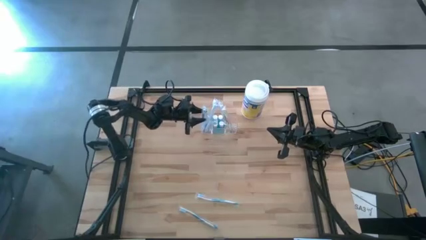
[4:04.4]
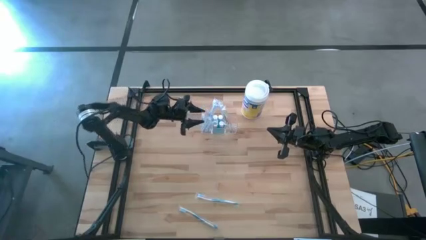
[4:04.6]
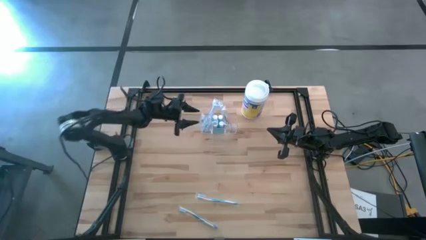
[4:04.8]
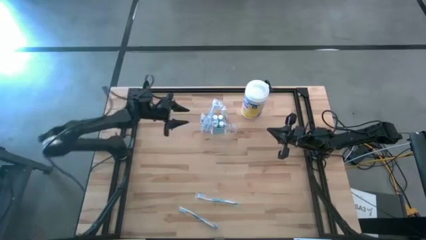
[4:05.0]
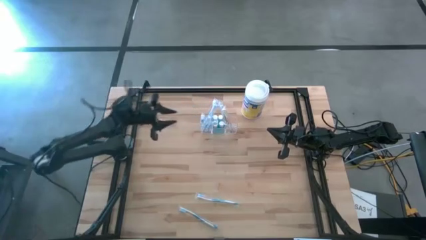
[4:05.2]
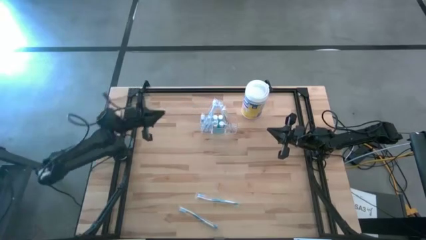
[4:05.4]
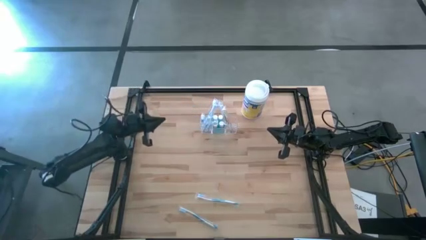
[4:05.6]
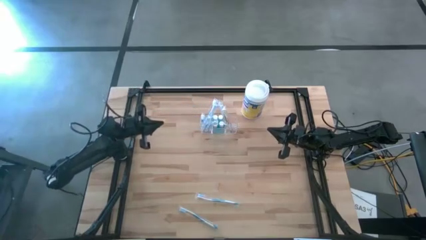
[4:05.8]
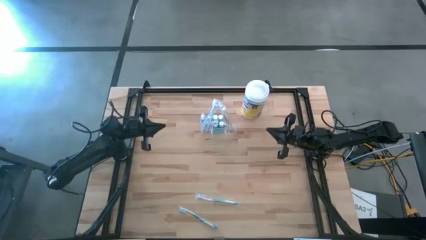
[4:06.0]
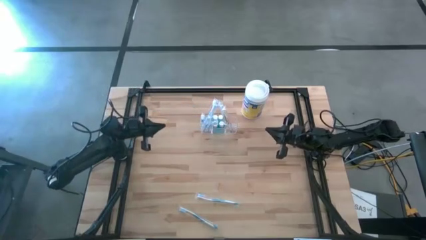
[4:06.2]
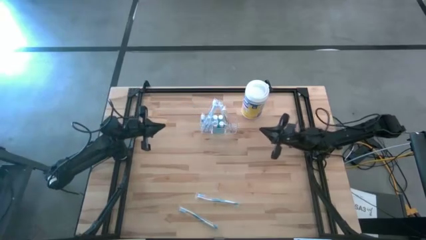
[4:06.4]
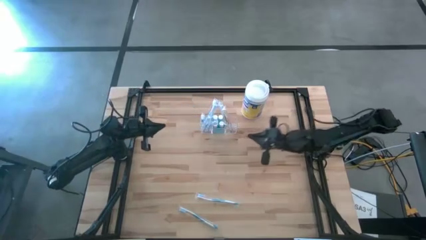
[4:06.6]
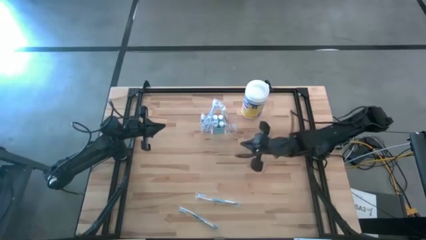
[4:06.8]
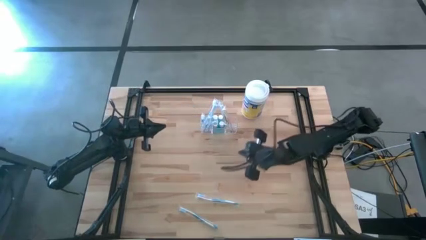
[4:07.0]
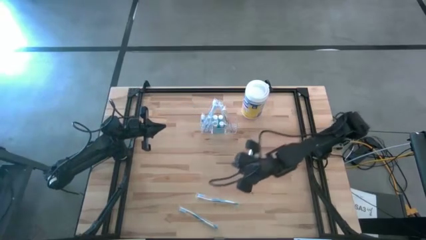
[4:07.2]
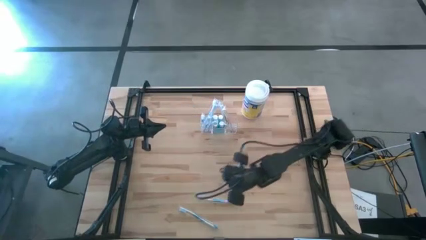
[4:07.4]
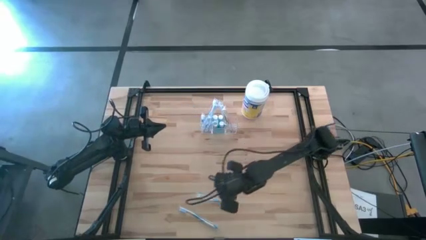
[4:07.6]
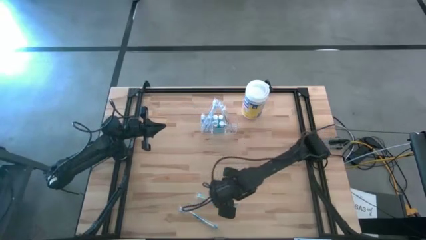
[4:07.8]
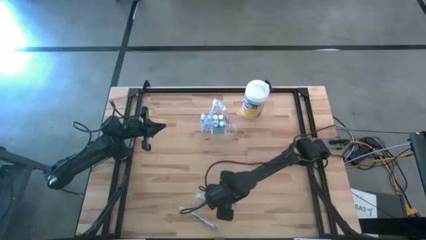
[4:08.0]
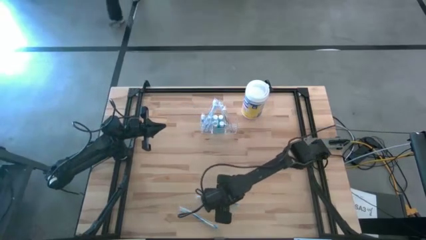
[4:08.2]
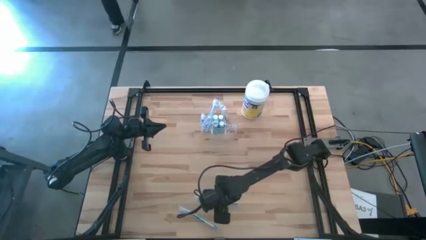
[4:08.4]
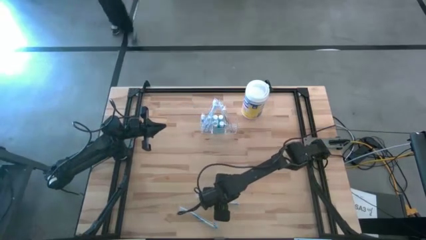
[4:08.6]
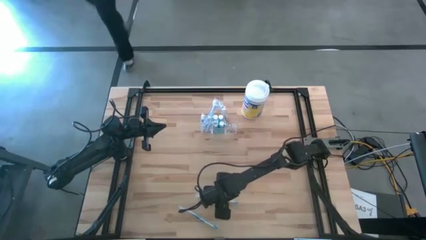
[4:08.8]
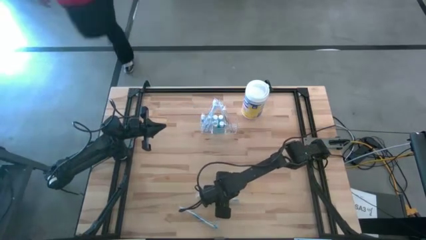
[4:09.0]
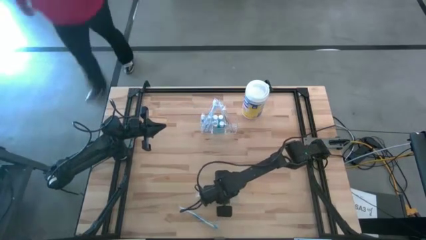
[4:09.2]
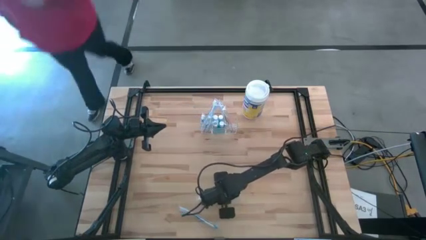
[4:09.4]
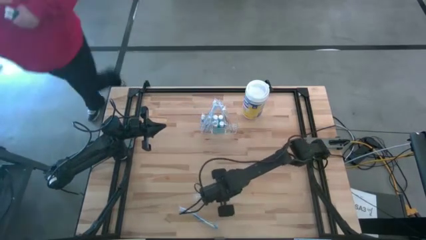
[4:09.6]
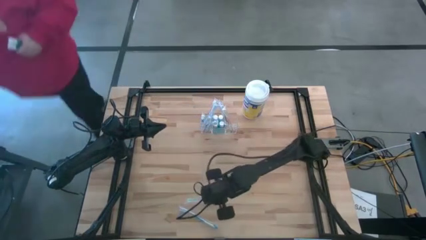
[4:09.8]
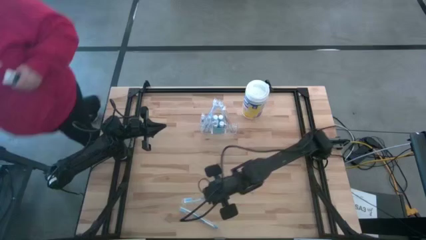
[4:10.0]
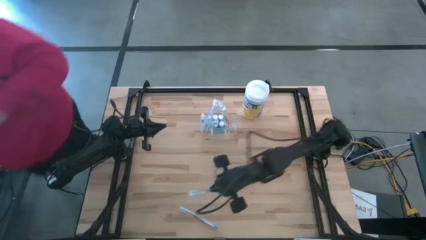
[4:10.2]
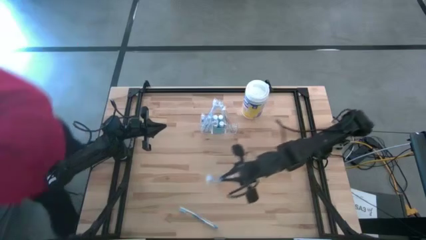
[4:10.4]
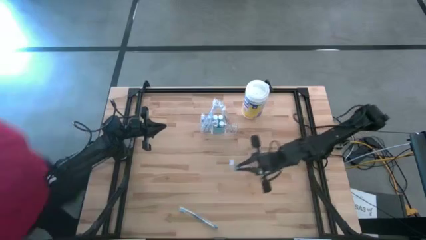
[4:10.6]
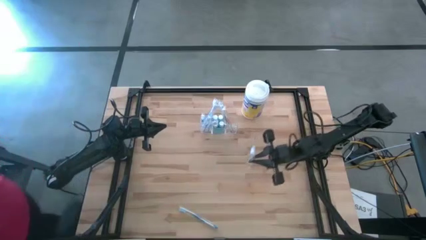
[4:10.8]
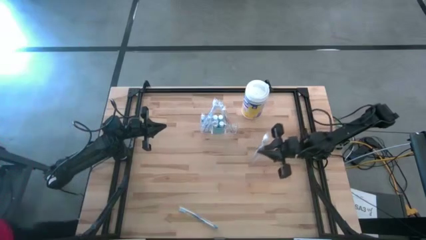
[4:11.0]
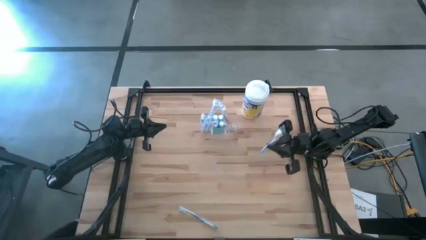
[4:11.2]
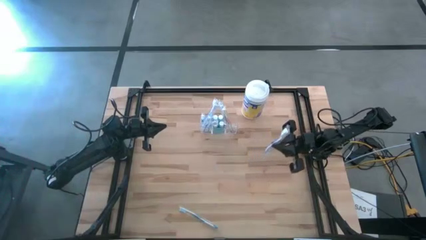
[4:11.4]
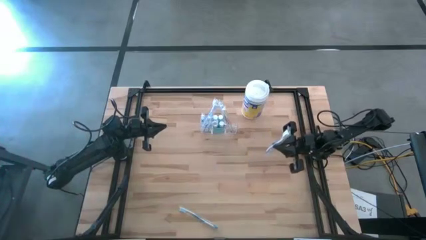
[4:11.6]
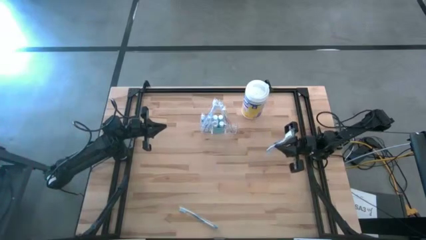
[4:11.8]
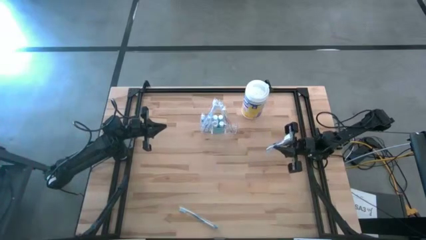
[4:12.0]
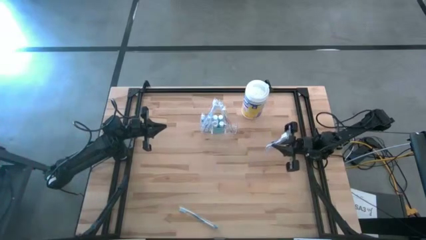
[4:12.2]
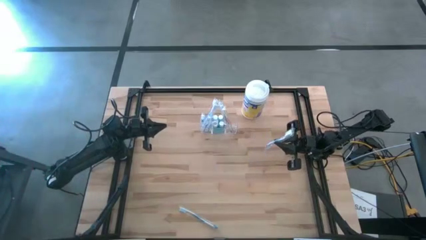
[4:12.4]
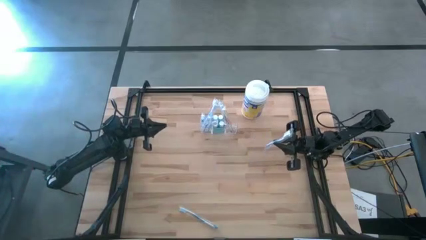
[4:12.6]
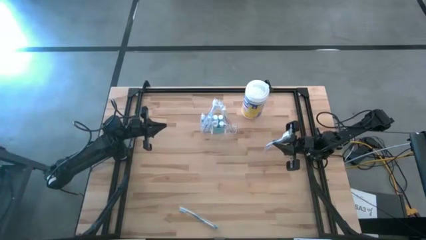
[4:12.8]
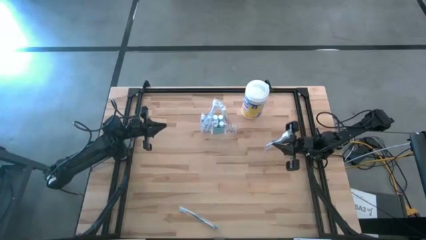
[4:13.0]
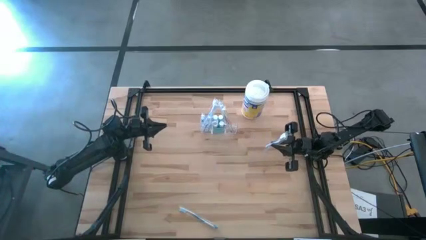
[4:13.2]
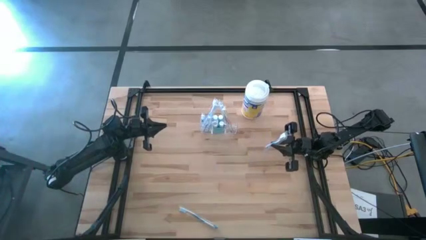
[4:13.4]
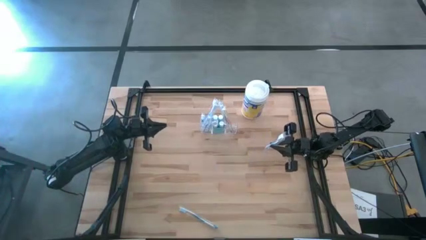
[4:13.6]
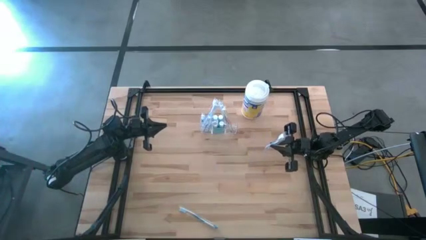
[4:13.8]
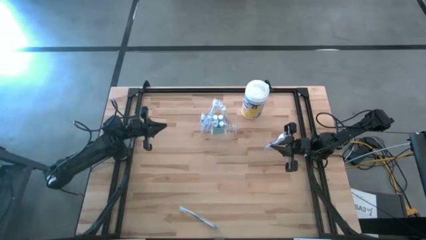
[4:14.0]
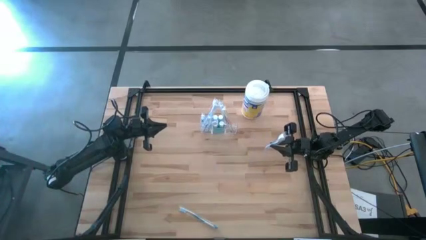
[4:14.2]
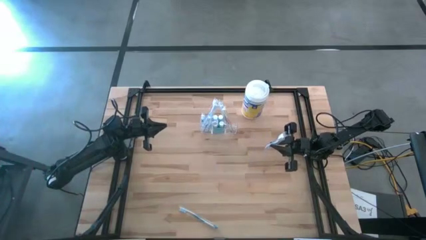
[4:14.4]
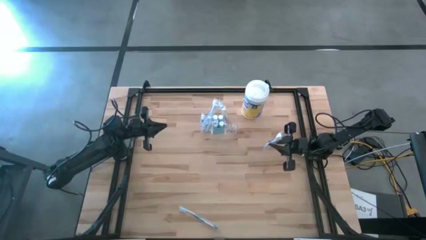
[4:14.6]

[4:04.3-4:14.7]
Task: Pick & Place toothbrushing station
Put the blue toothbrush into the transparent organizer
